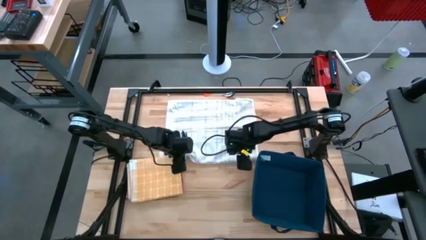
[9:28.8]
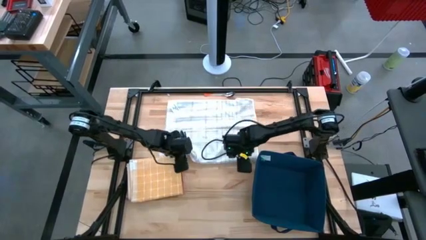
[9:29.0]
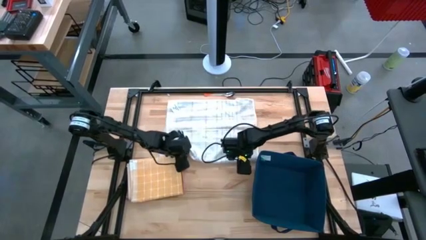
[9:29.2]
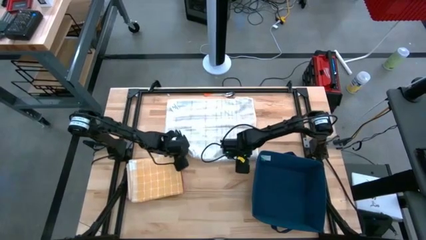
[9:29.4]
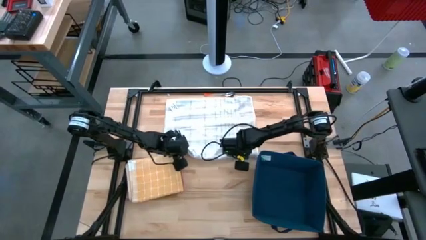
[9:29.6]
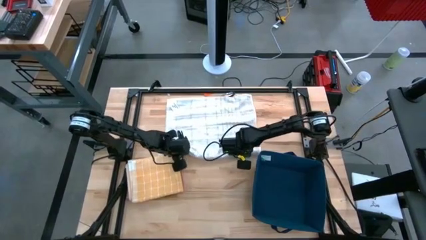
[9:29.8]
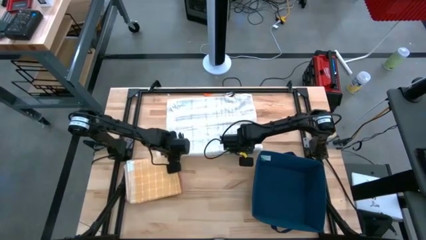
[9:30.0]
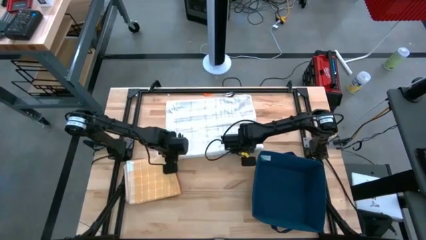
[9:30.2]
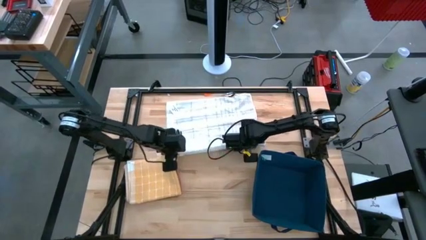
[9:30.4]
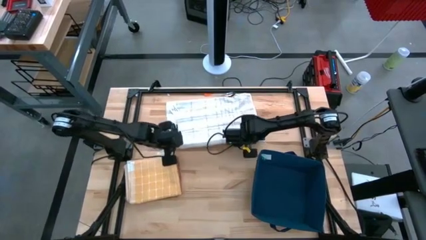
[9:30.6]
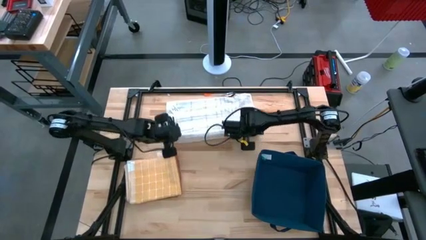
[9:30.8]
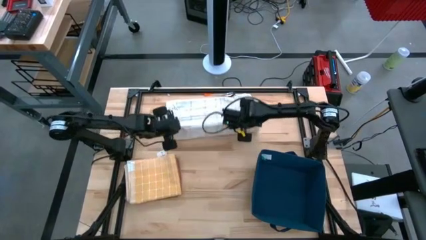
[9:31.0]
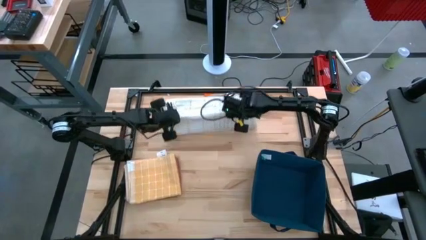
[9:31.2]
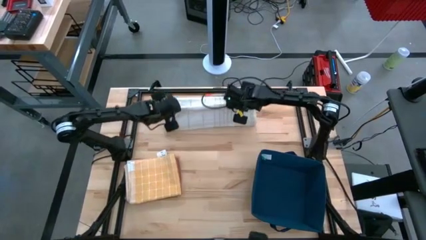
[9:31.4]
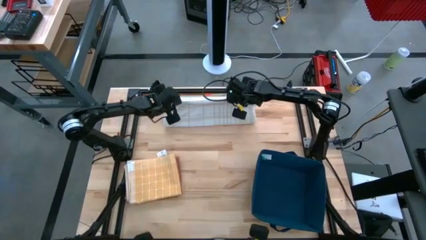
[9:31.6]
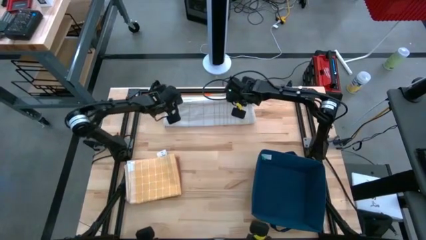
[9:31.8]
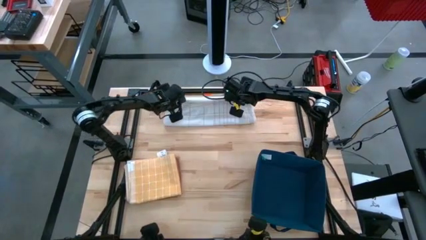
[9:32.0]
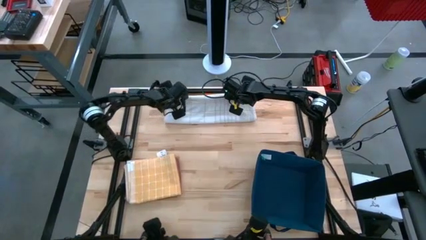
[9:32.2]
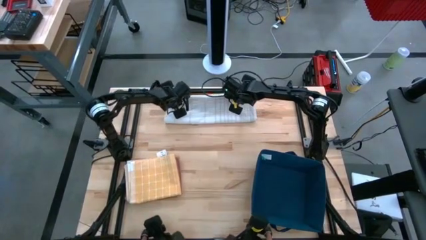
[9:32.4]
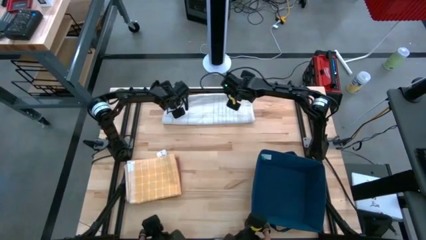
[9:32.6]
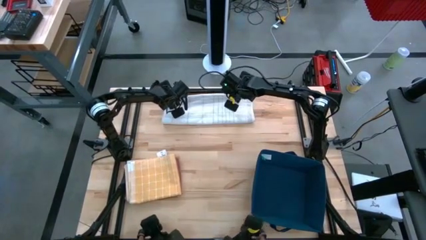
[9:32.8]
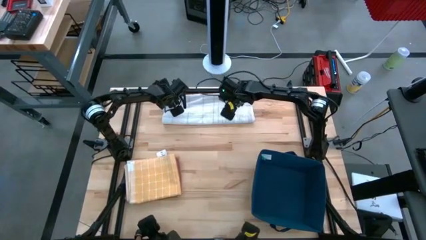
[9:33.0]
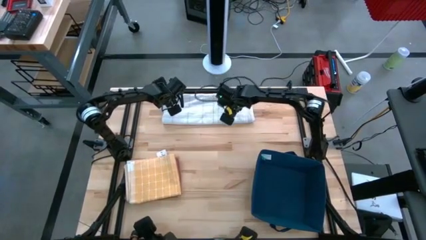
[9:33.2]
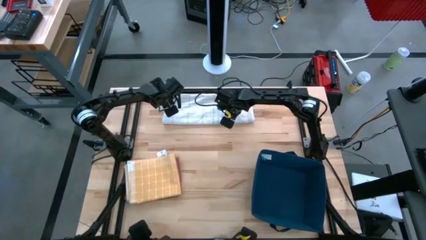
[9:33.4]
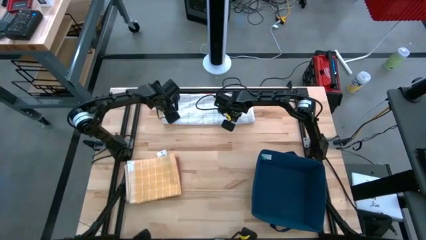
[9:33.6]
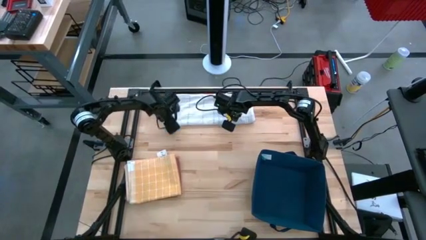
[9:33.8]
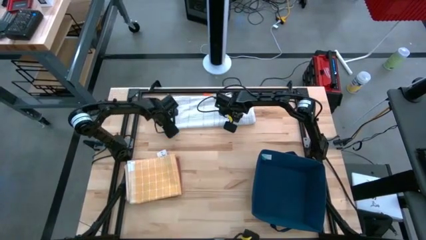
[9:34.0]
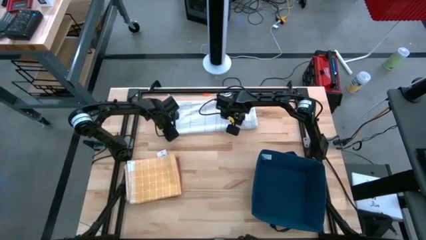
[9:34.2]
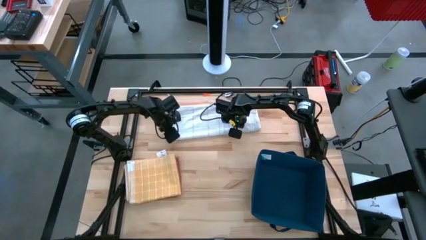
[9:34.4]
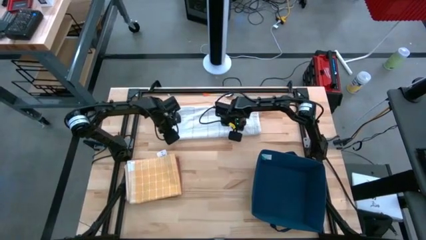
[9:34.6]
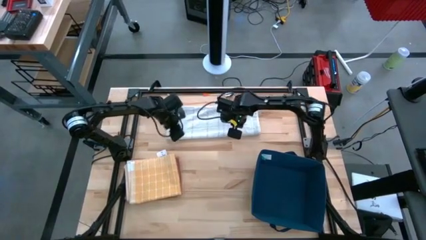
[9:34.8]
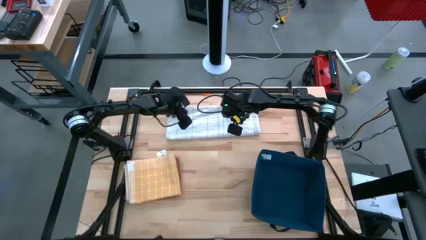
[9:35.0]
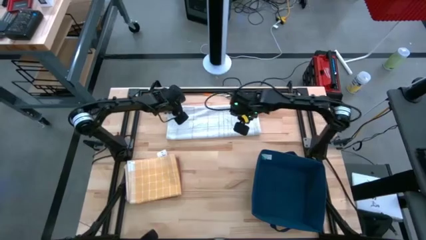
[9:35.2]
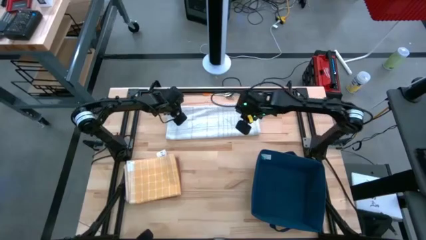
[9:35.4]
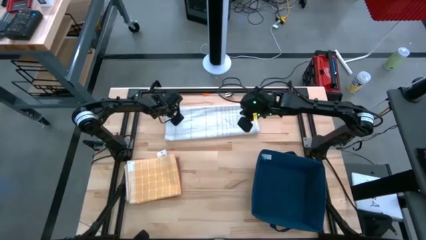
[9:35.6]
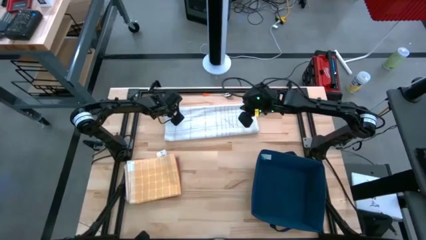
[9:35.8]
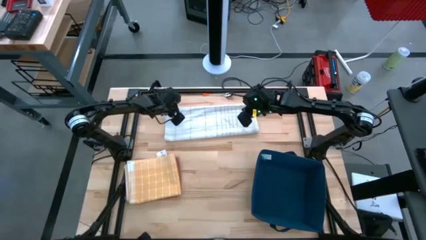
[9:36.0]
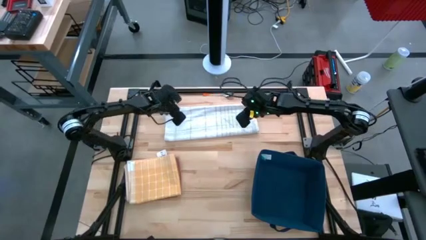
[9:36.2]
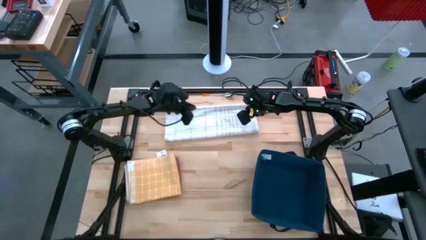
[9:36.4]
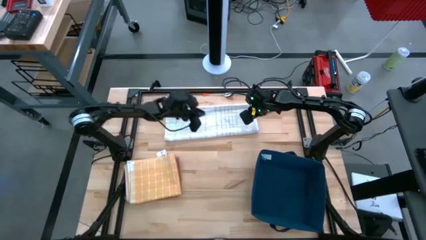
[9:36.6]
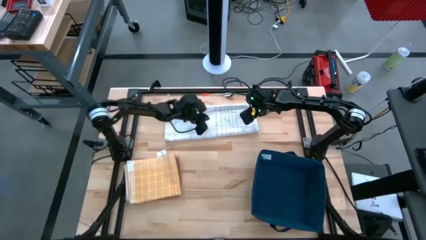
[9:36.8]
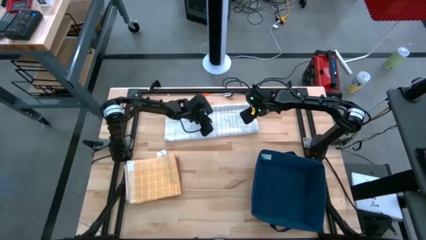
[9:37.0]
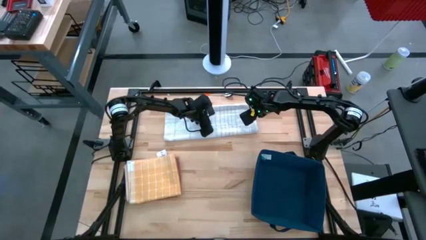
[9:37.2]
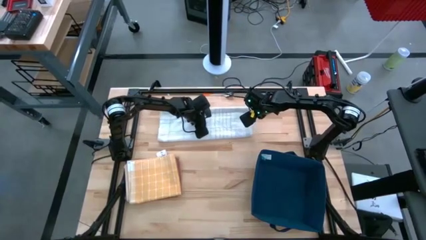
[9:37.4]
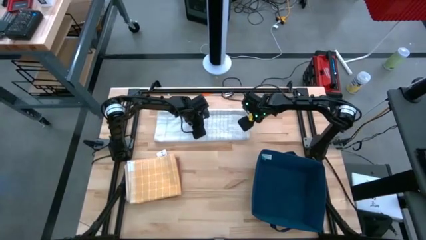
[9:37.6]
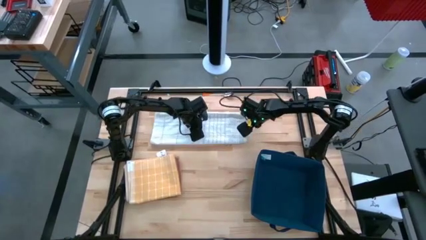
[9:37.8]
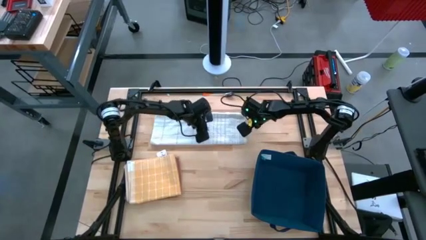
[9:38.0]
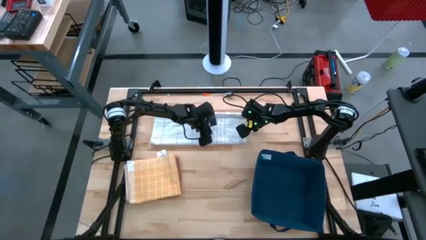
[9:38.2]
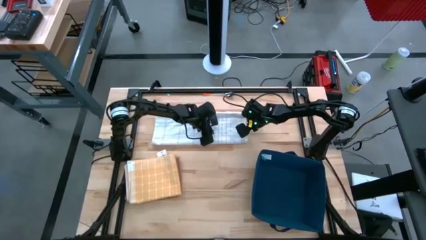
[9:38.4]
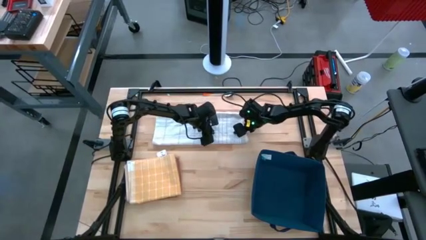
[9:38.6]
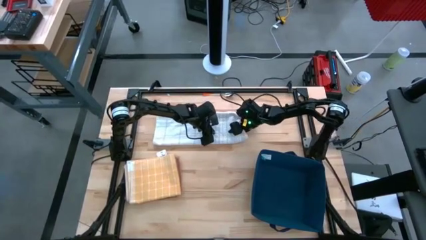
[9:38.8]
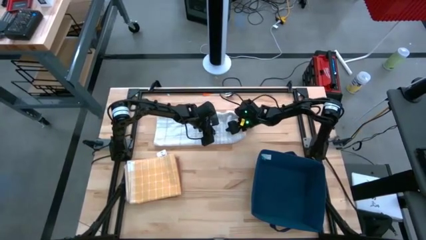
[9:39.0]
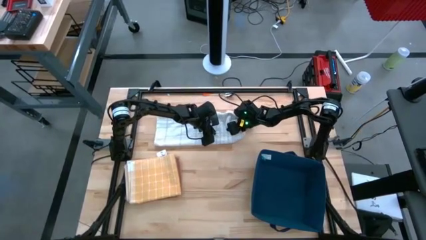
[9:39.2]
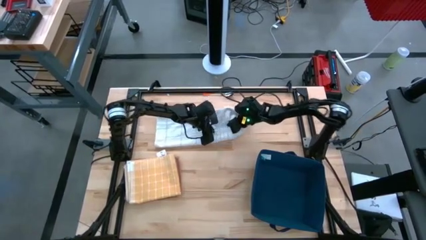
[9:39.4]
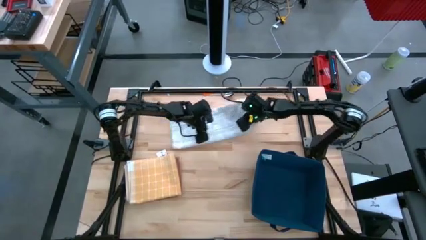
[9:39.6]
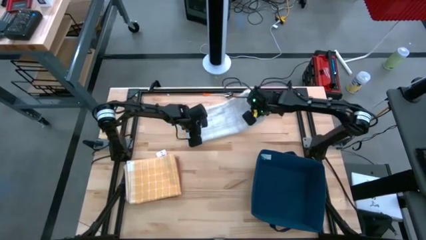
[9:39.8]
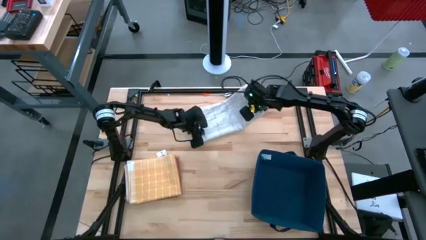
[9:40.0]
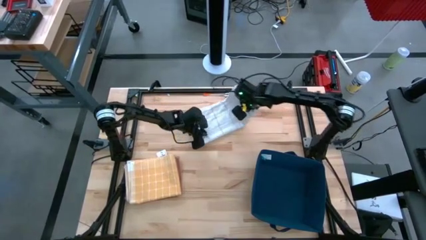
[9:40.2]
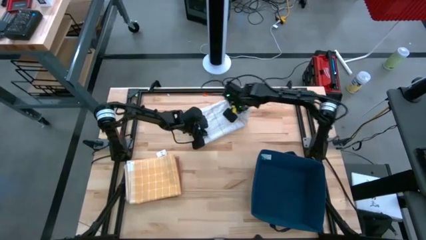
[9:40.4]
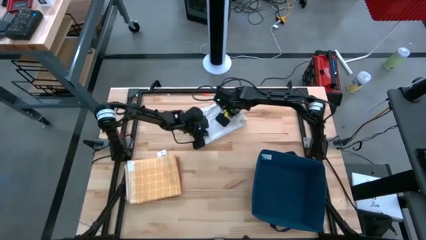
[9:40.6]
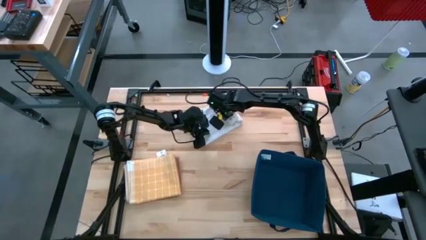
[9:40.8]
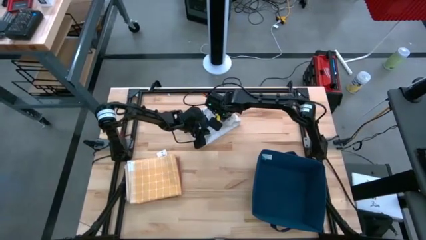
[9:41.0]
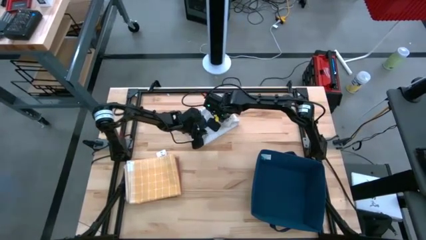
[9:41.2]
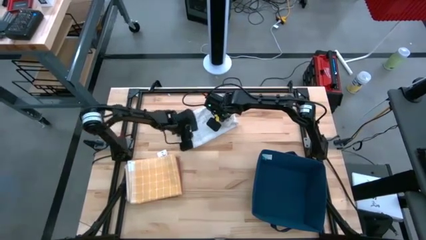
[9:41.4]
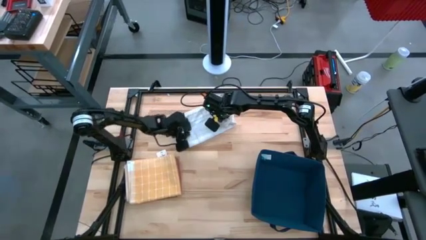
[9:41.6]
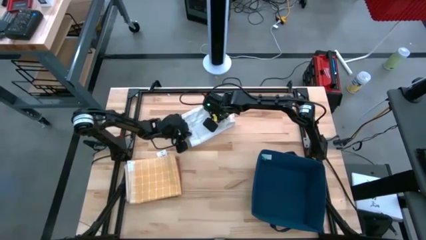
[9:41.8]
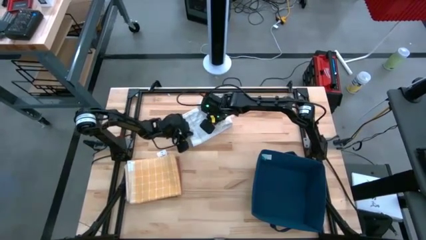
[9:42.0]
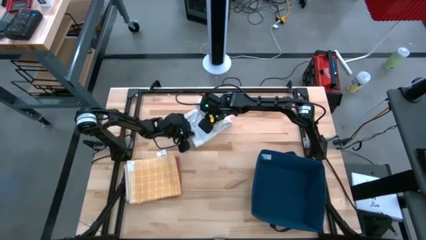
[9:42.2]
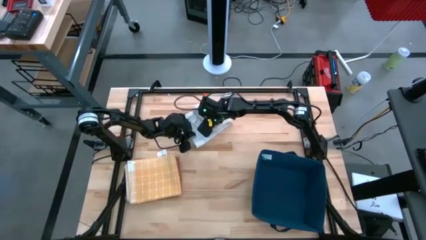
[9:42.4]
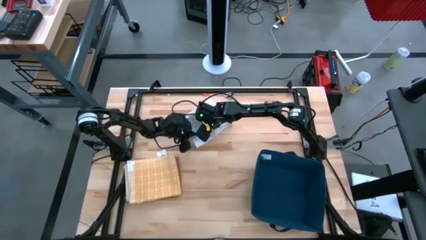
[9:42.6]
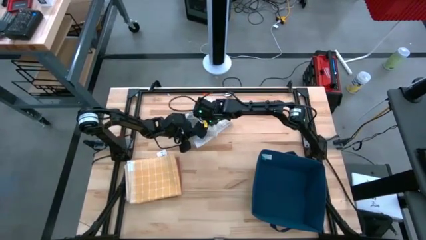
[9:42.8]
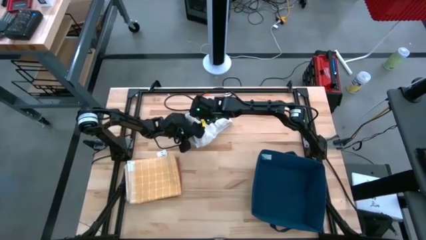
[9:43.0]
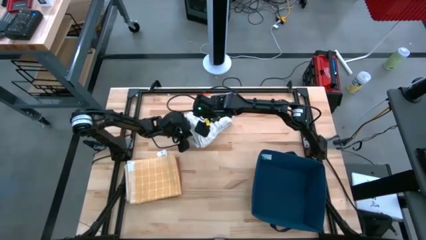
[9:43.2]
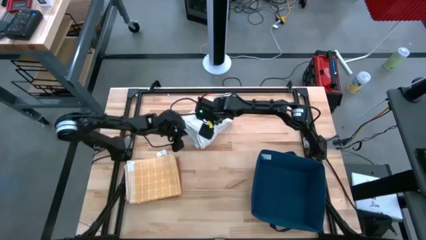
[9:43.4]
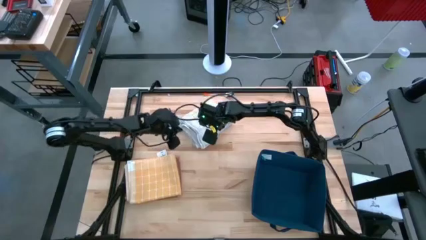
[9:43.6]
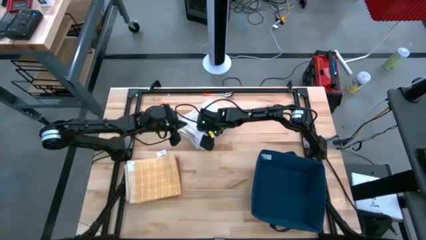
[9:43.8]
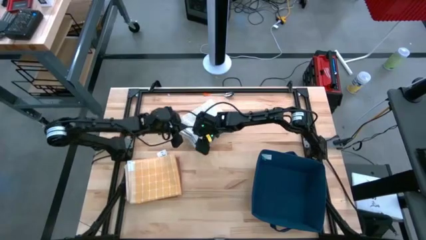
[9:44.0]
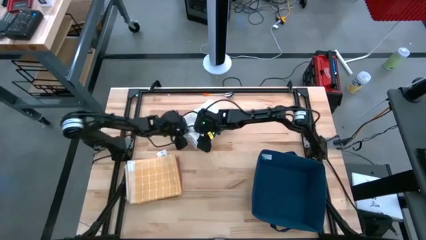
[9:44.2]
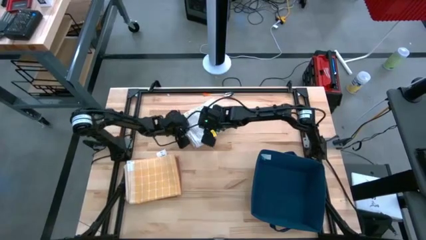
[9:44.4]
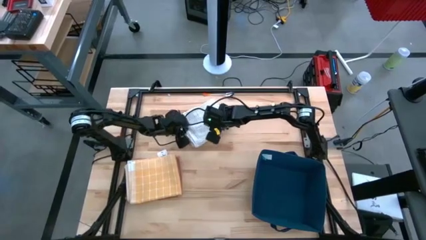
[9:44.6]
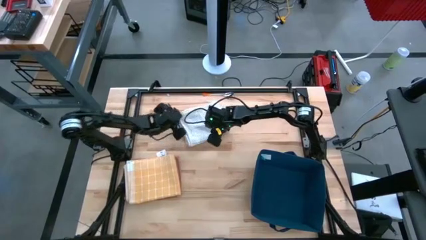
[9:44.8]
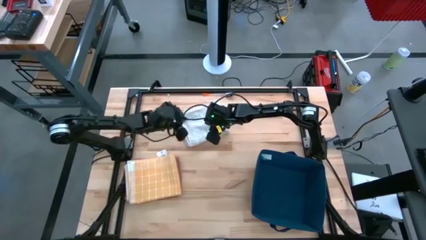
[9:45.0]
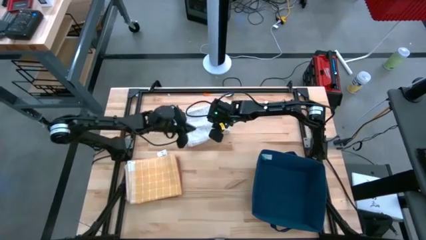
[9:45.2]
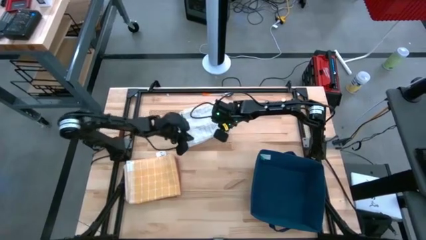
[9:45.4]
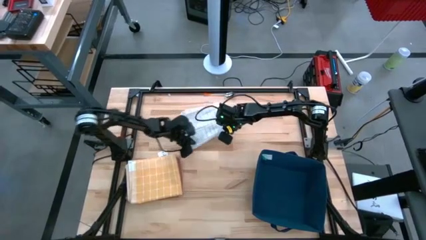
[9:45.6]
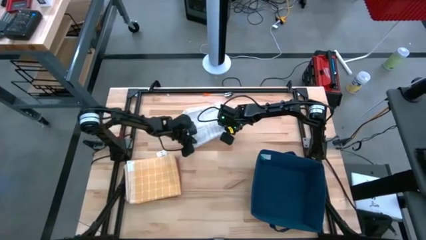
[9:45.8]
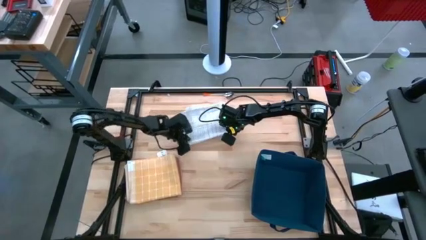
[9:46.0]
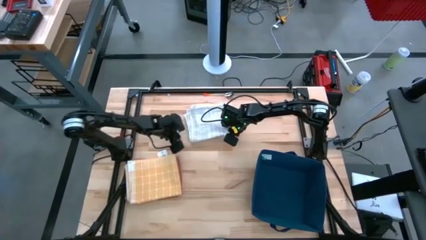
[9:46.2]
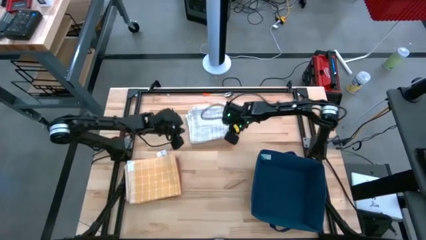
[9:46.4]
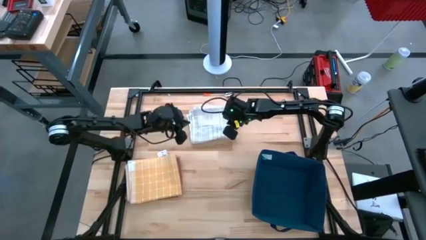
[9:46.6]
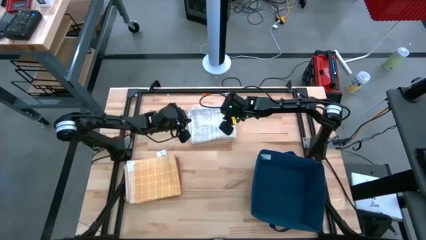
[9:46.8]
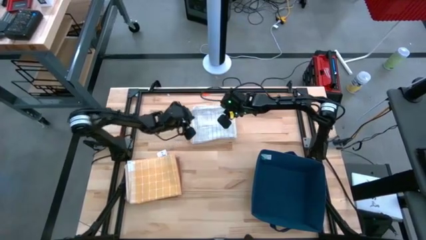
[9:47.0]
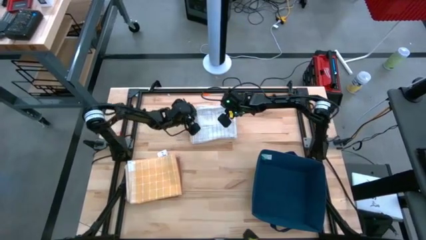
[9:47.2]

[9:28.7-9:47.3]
Task: Fold towel
Fold the white towel
